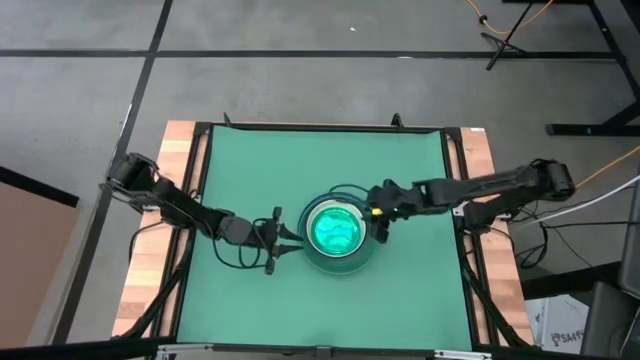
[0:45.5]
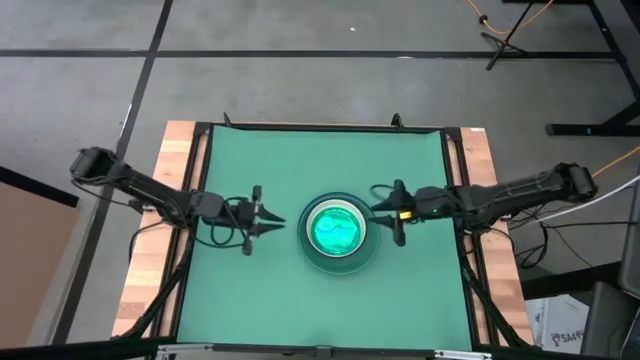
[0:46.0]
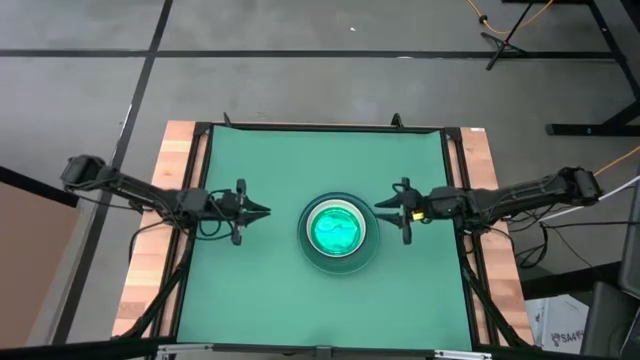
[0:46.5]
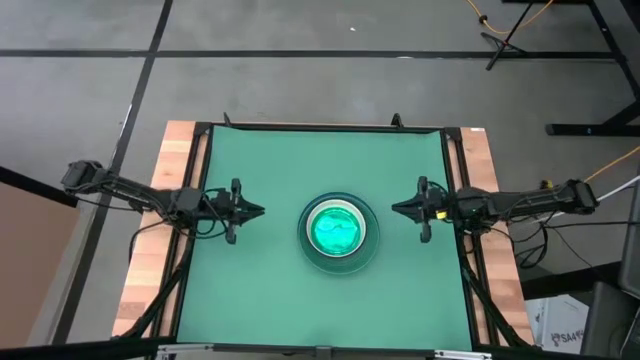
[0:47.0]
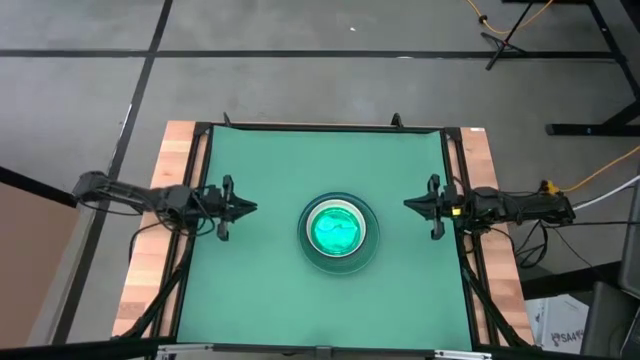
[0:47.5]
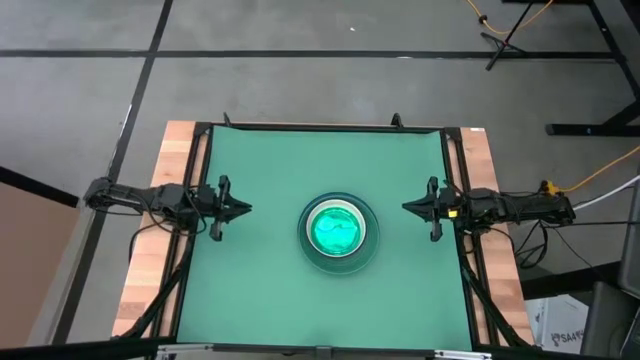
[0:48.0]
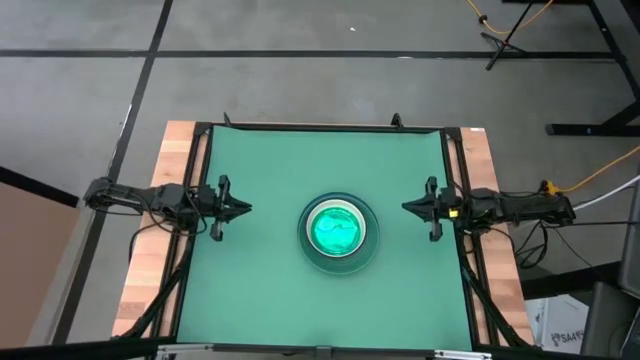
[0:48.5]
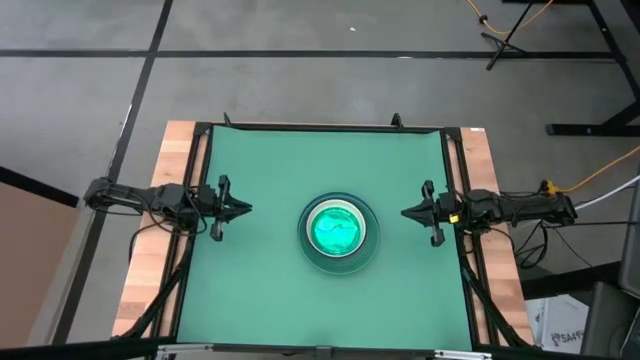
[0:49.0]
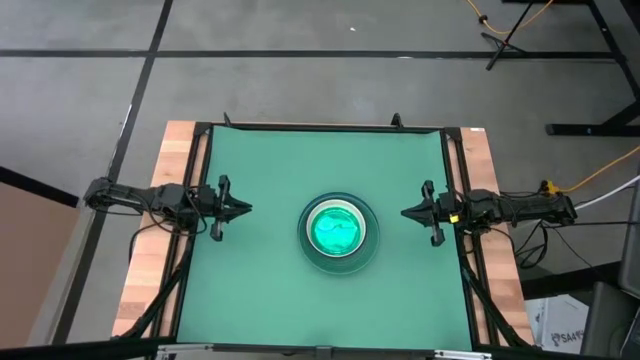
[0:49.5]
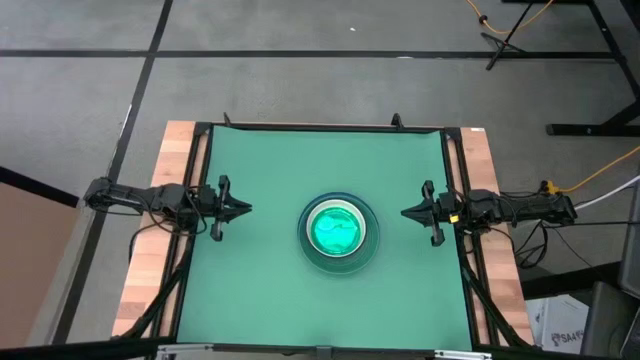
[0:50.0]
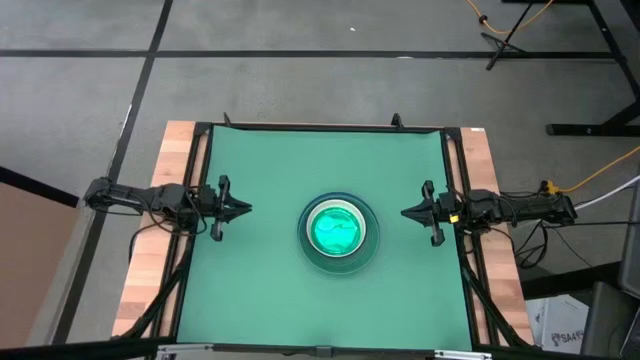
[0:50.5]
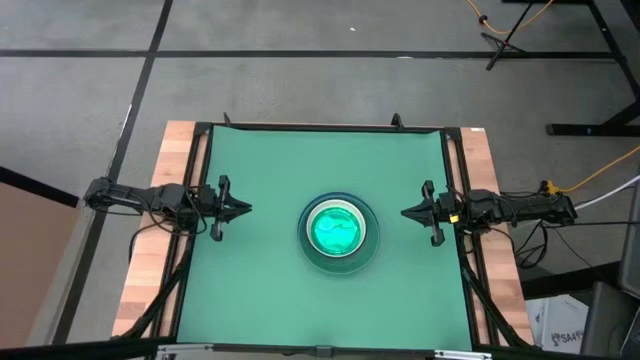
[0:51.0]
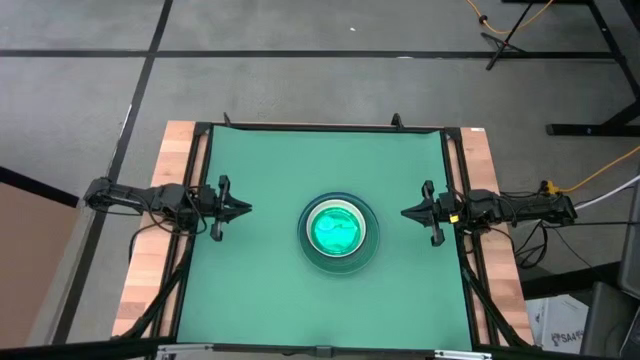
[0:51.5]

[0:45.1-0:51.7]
Task: Stack plastic plates
Return to Home Position

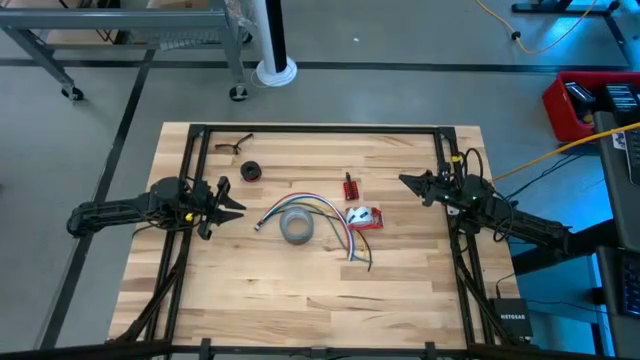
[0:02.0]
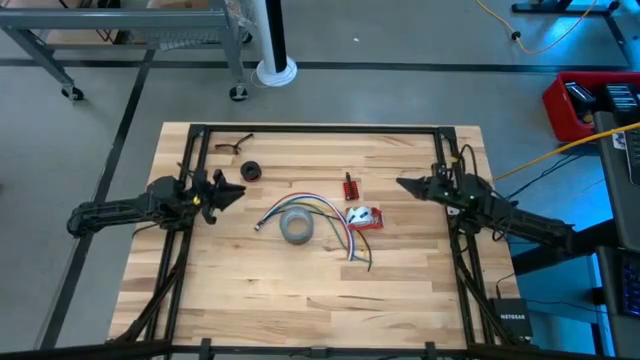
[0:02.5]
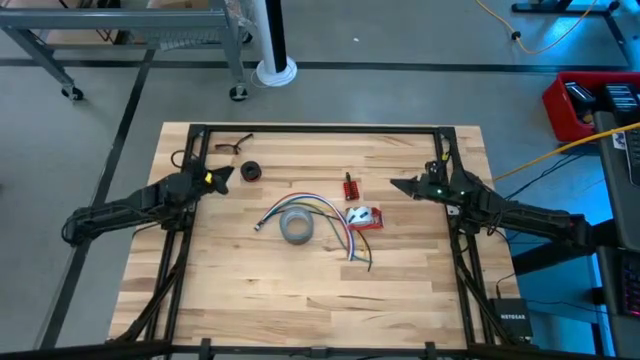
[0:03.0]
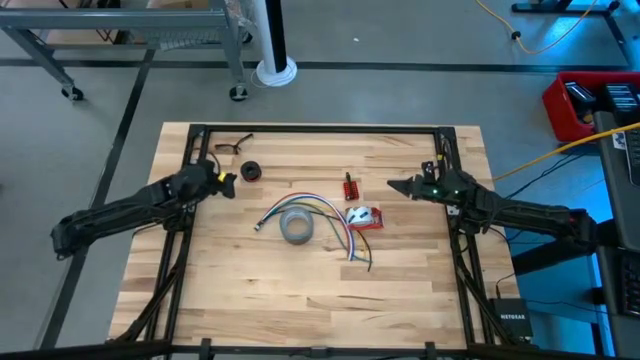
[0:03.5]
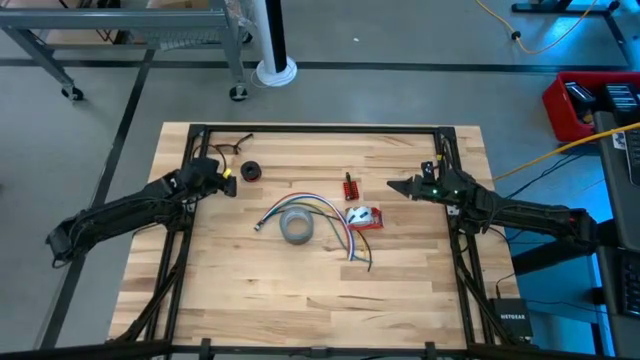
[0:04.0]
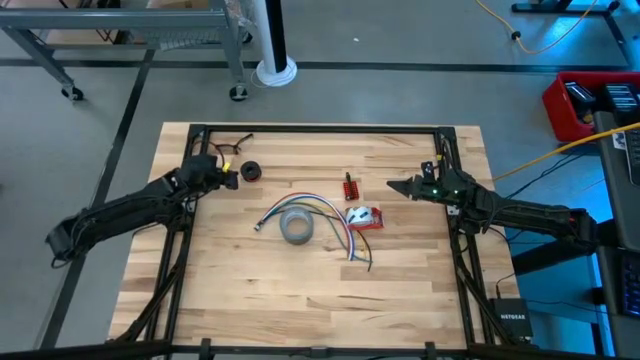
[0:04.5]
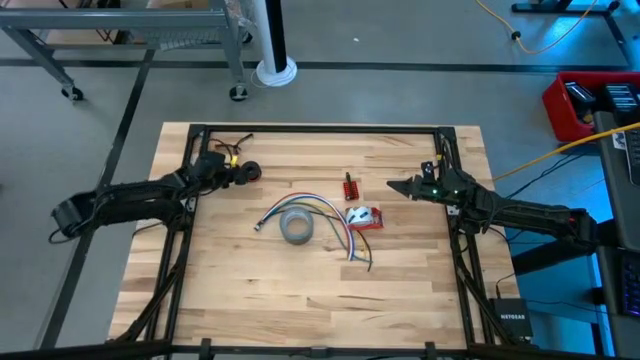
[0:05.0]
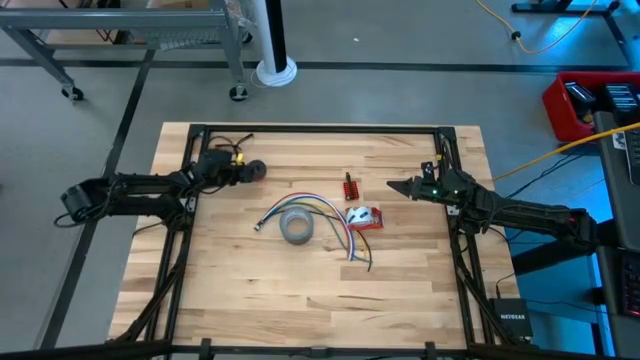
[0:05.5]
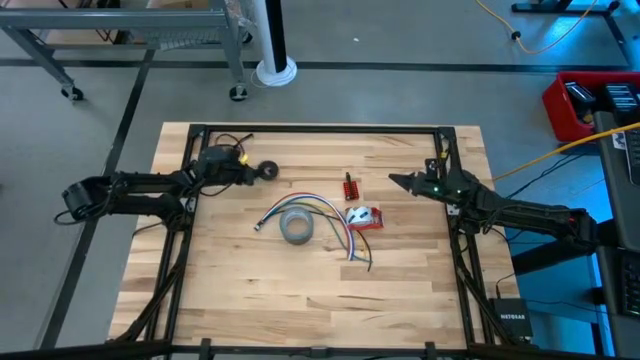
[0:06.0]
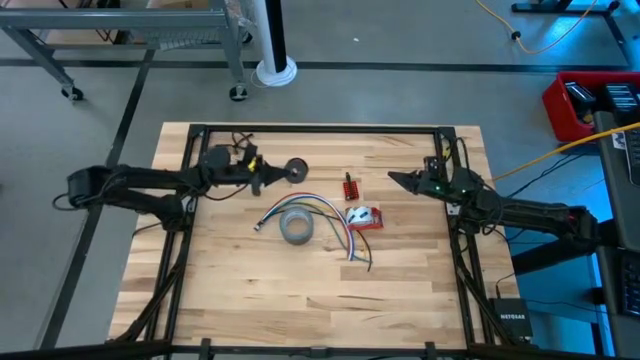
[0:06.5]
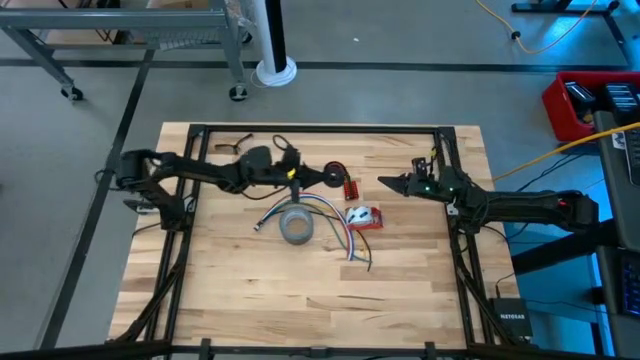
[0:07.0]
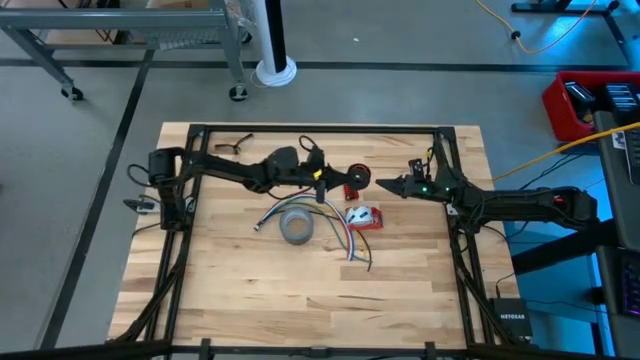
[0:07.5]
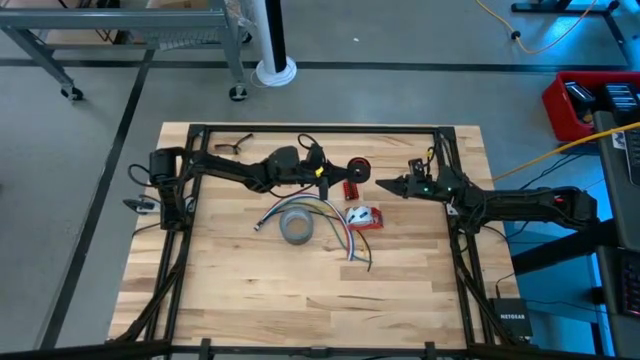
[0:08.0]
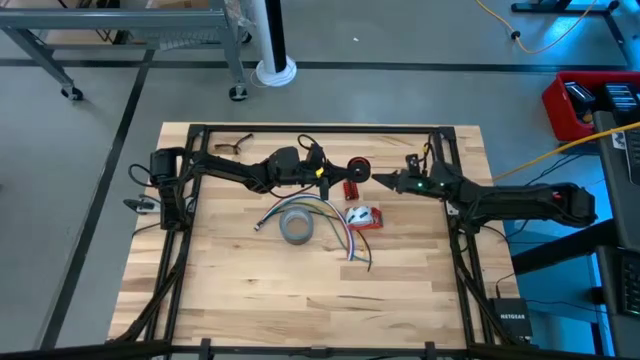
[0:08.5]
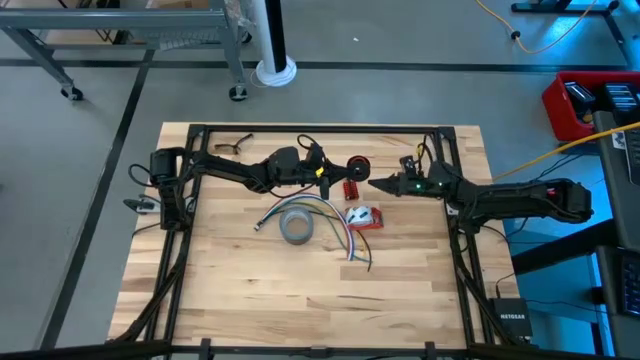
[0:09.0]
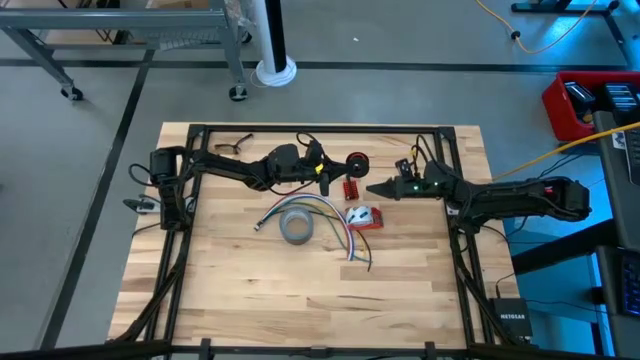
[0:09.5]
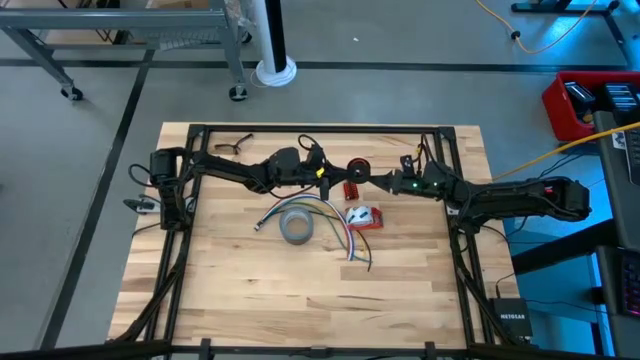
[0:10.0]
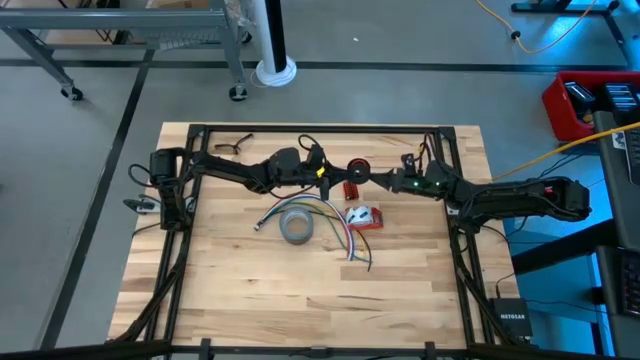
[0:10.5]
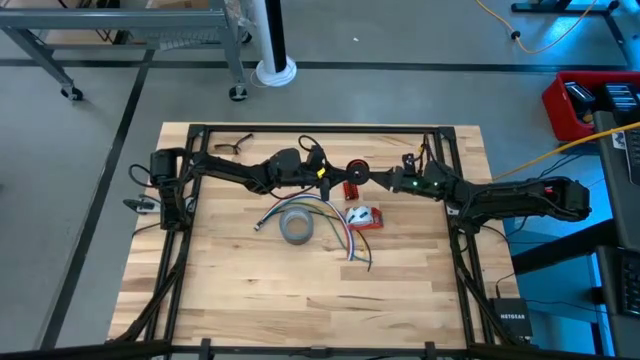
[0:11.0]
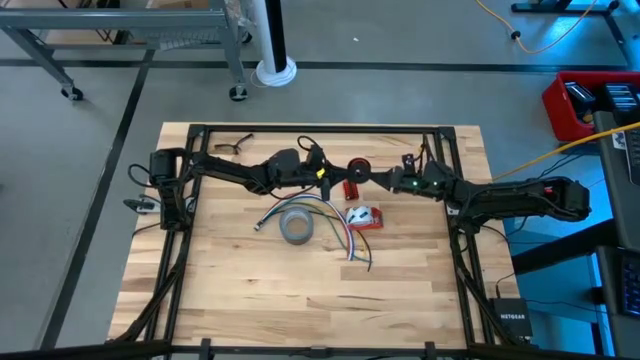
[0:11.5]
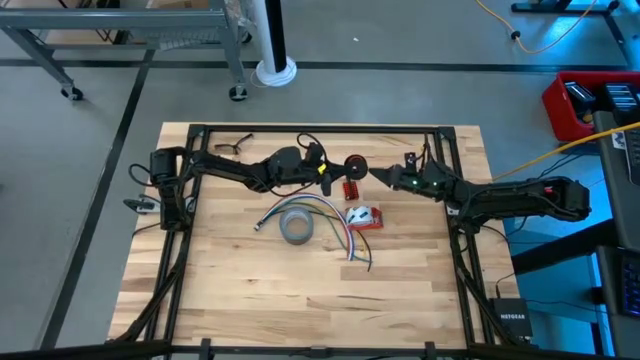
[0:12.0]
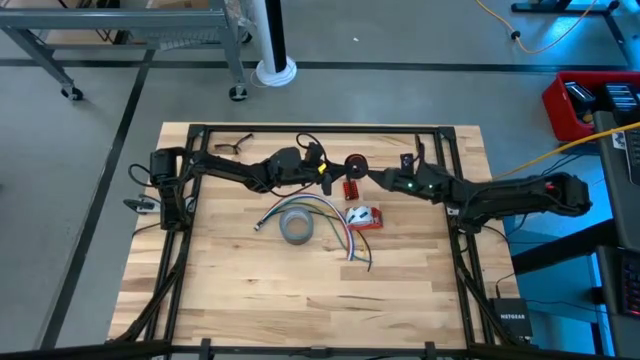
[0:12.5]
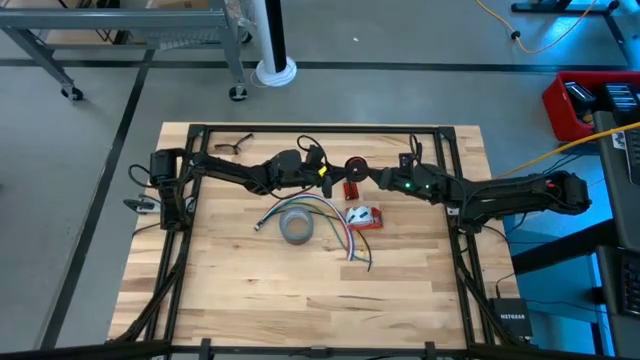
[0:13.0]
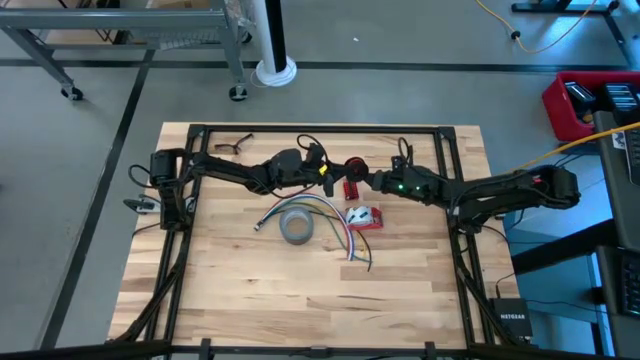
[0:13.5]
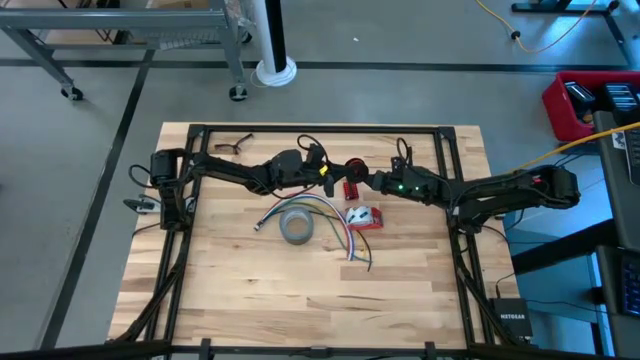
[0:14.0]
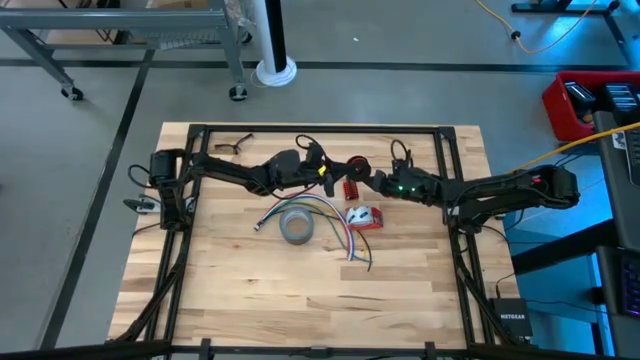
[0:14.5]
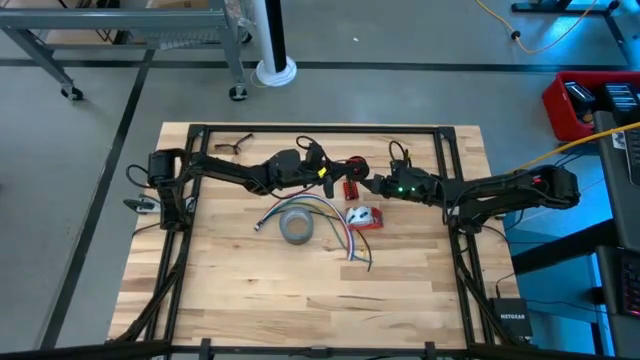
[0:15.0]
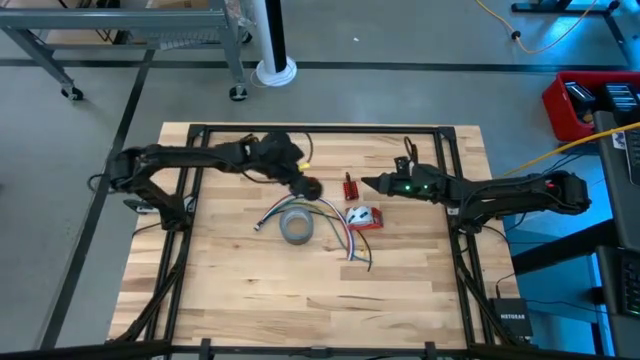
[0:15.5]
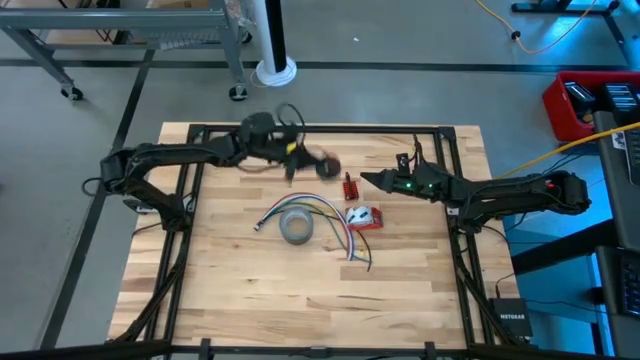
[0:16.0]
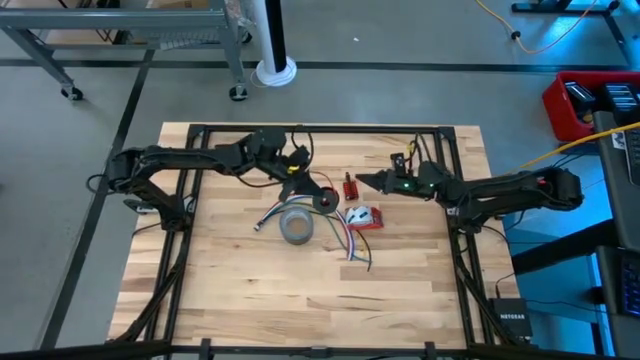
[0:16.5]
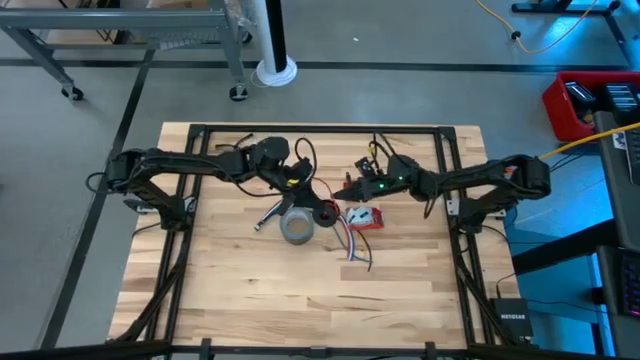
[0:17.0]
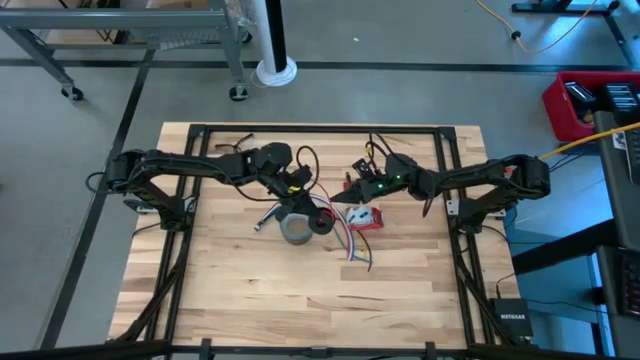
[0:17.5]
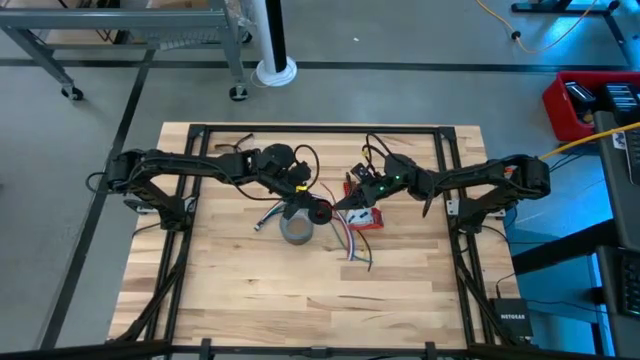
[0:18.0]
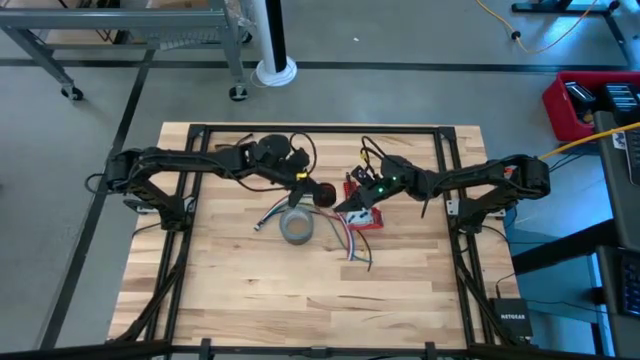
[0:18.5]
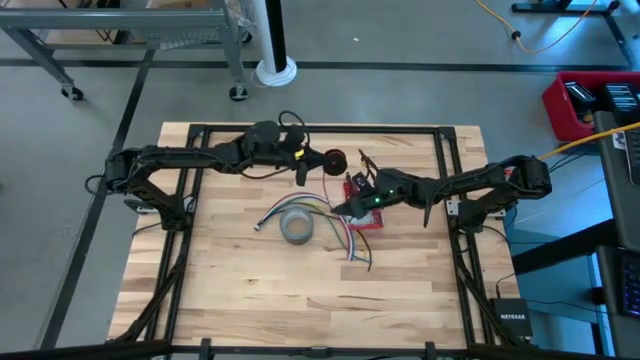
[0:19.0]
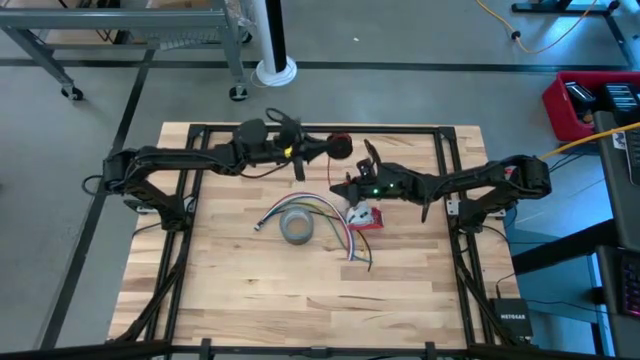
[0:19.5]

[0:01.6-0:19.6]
Task: Coil cords
Uncoil the red wire from the black spool
